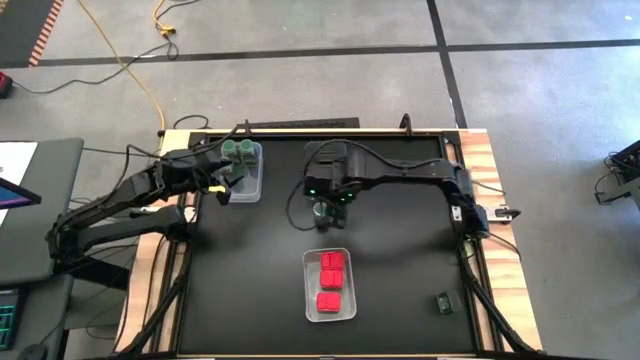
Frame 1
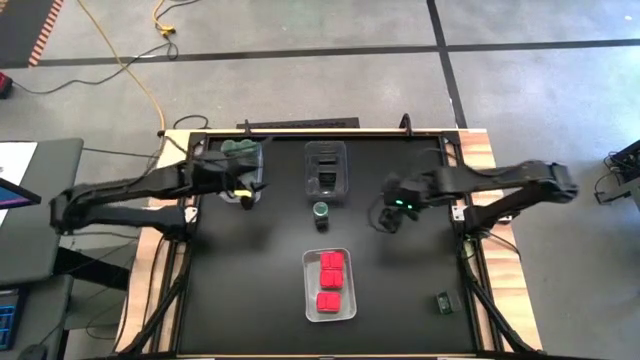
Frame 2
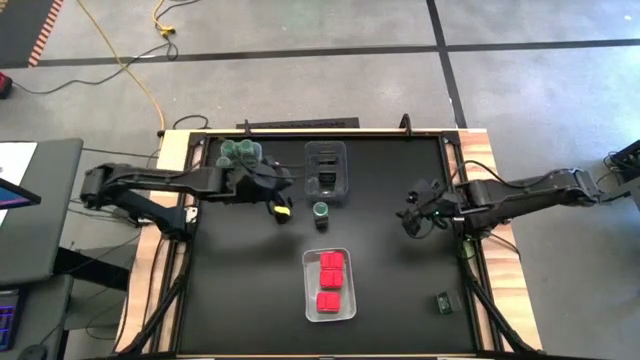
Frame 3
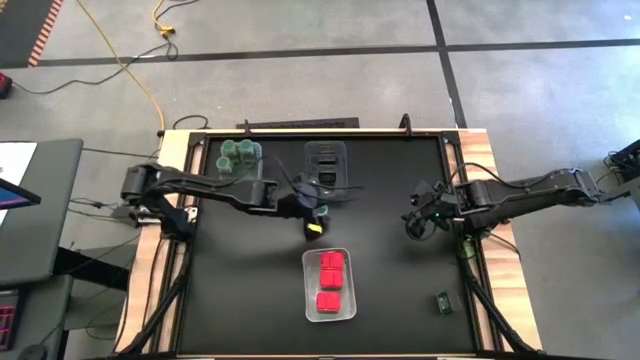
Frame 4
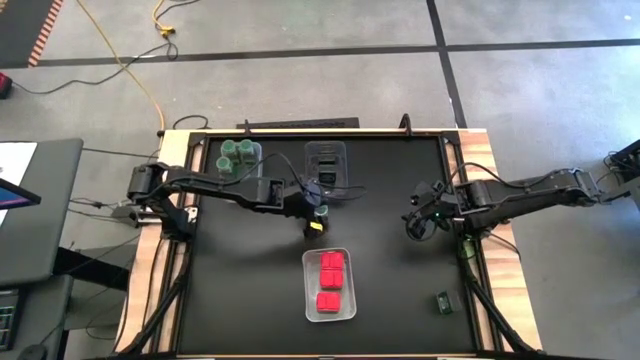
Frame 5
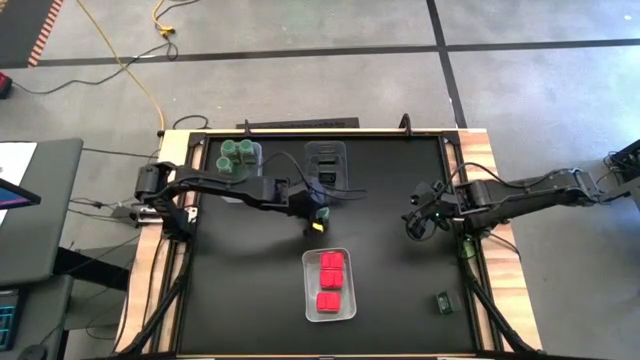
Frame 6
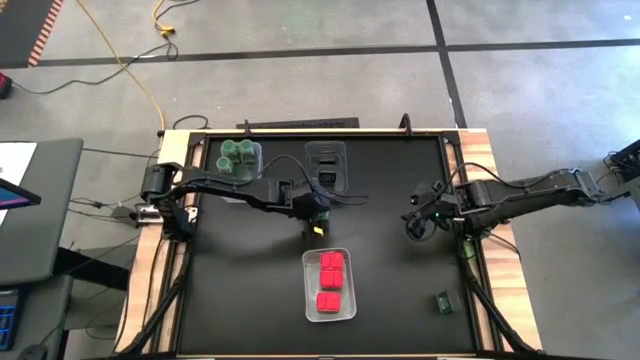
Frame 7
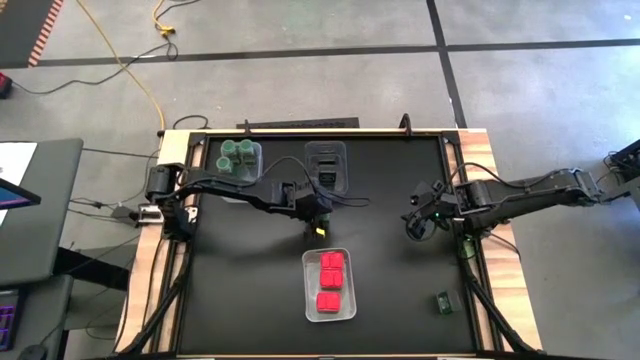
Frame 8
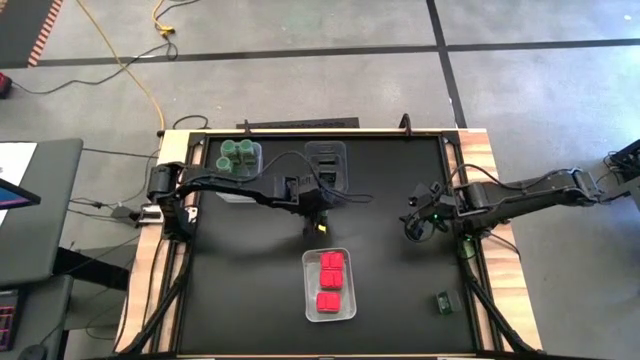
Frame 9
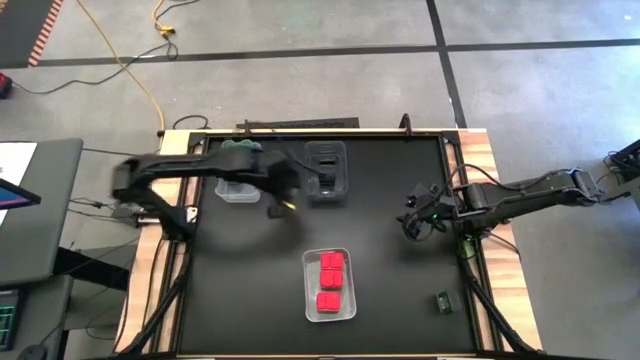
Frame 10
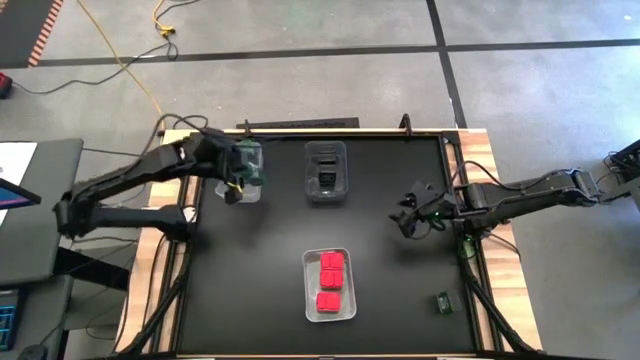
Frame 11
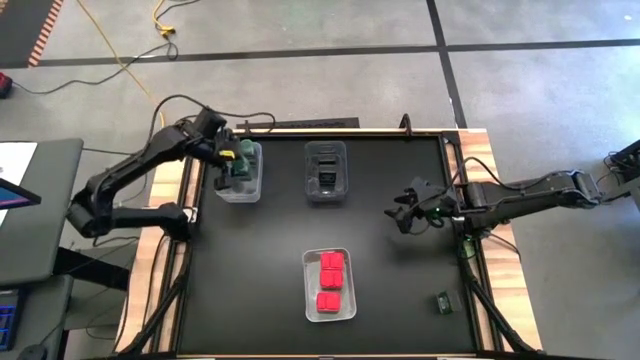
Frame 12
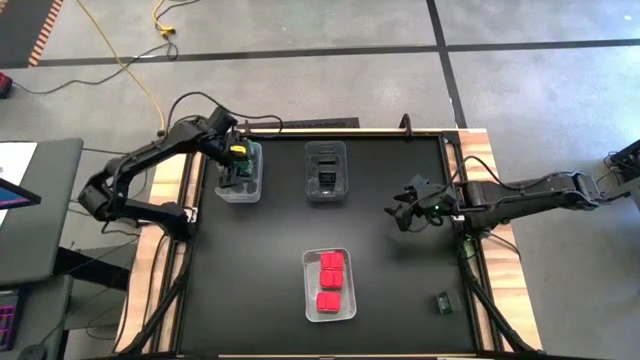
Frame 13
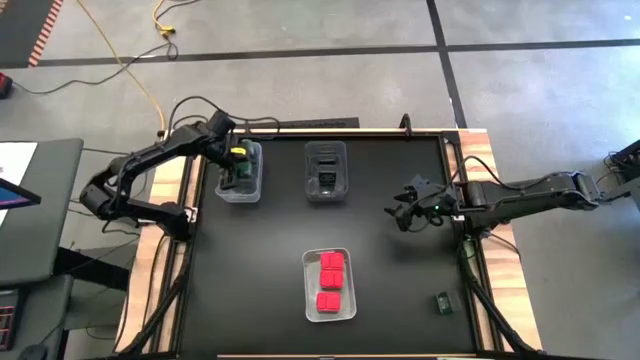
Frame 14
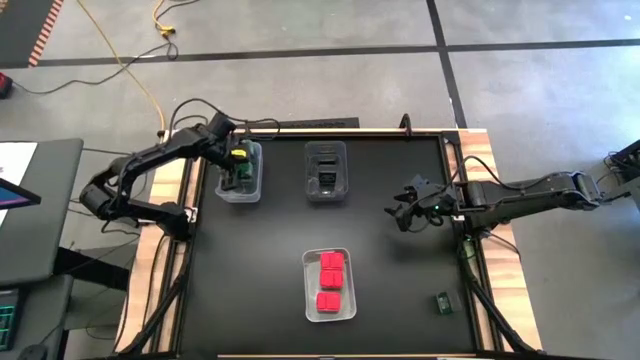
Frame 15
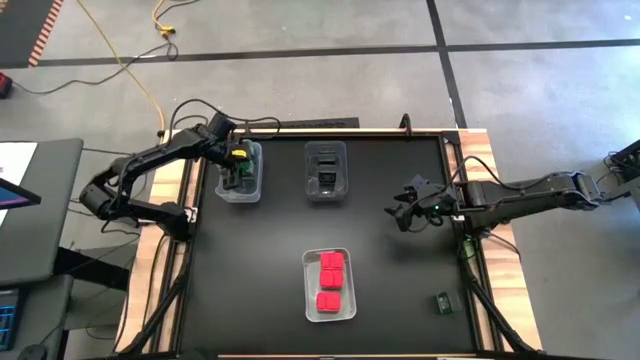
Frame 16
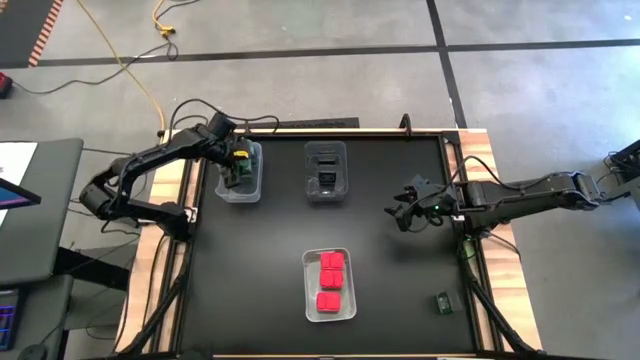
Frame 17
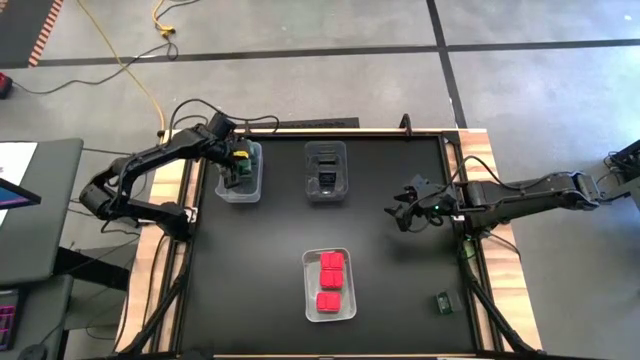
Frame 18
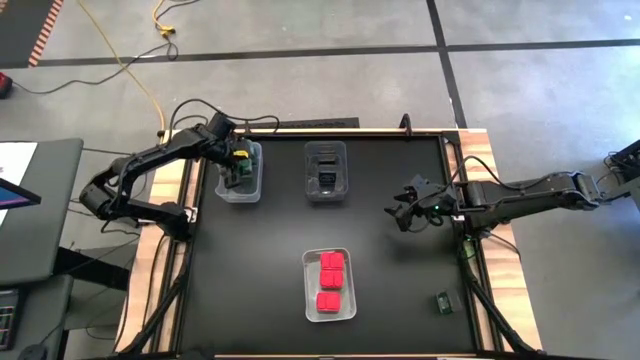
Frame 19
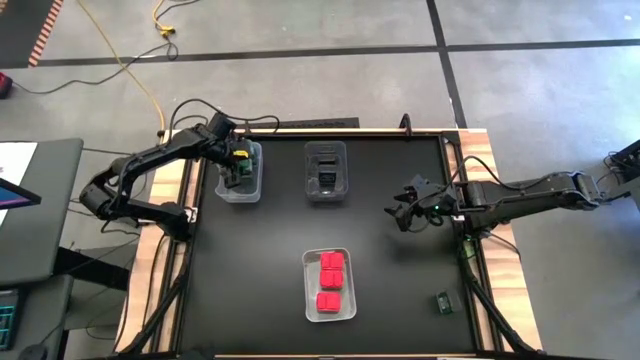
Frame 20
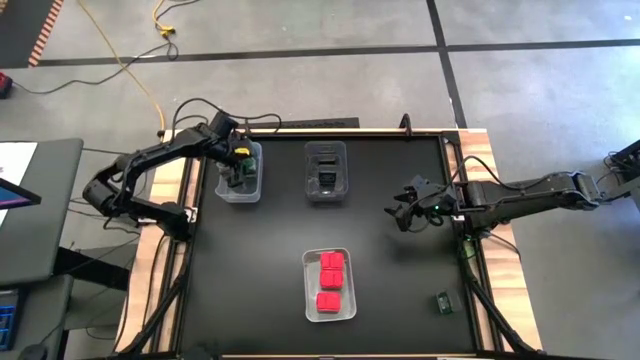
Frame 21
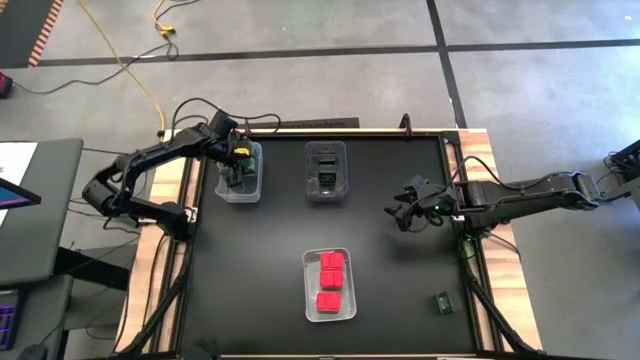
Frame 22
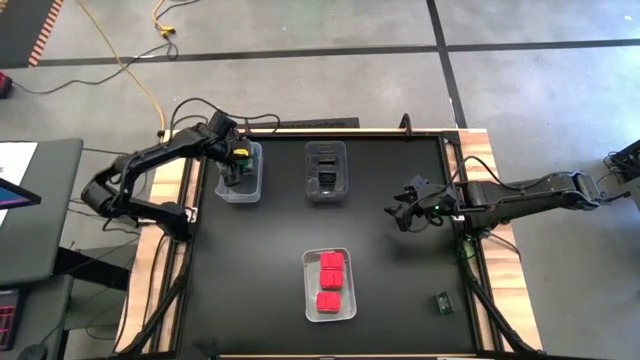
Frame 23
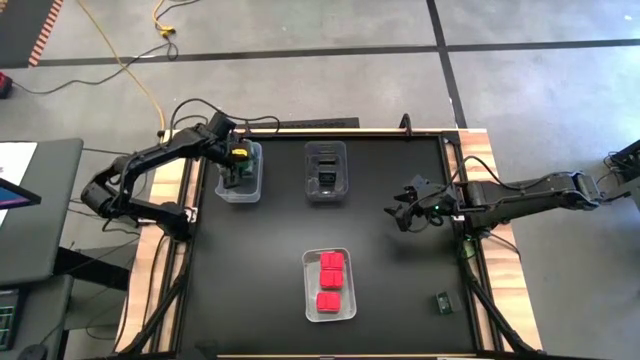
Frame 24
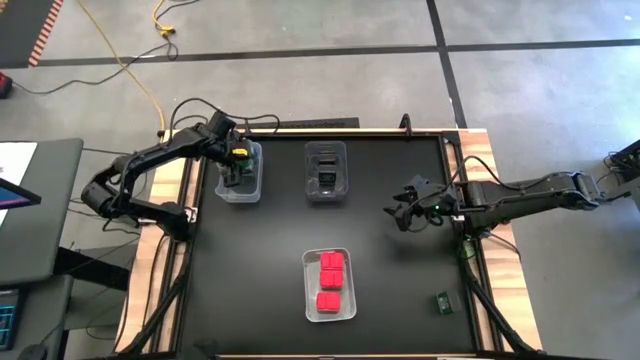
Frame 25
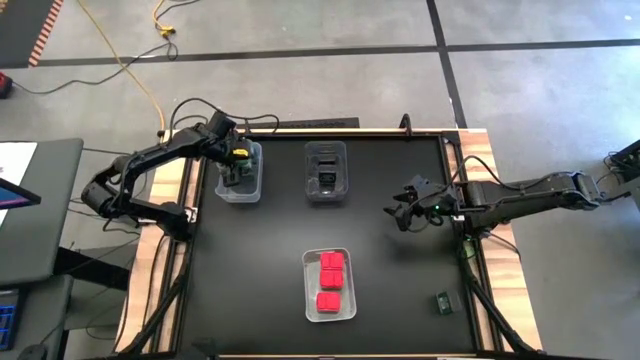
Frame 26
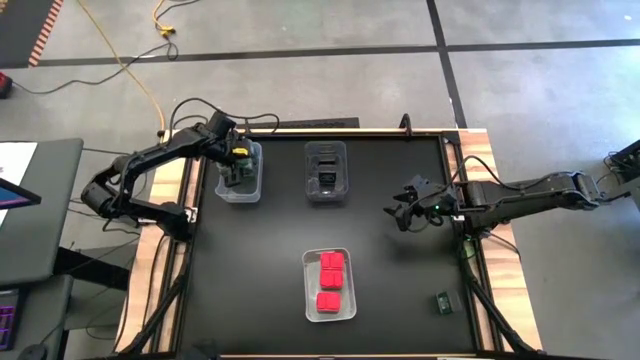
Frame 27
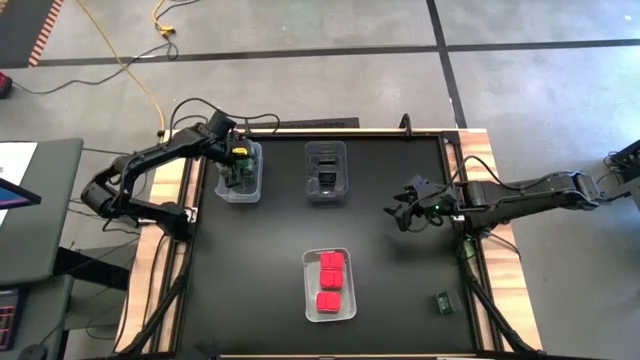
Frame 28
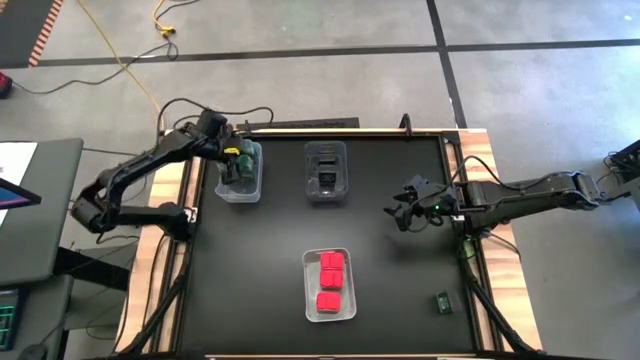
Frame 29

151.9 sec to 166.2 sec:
Task: Sort spices by type
Put the green seasoning bottle into the transparent bin

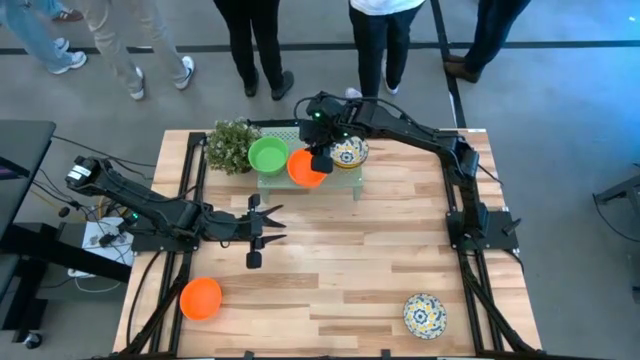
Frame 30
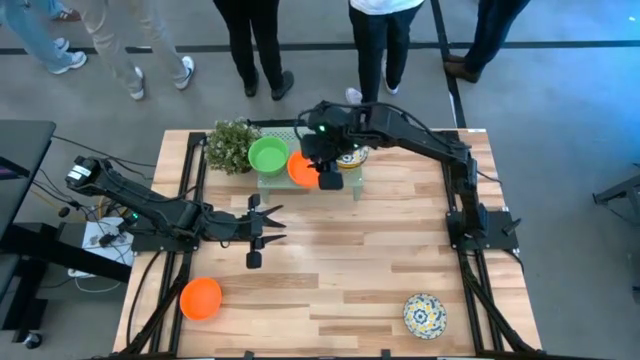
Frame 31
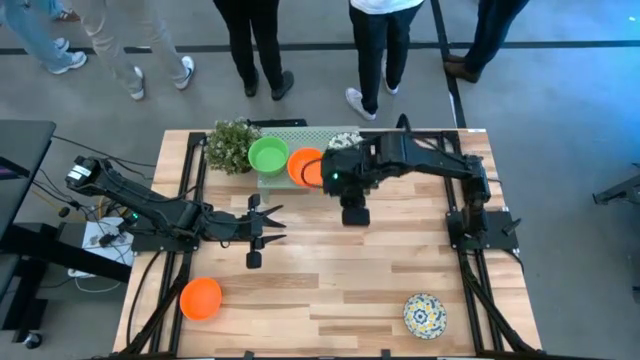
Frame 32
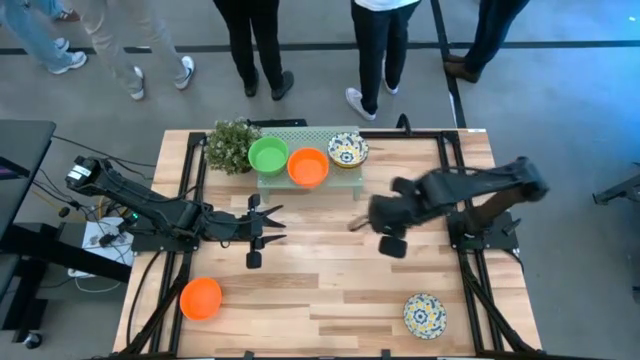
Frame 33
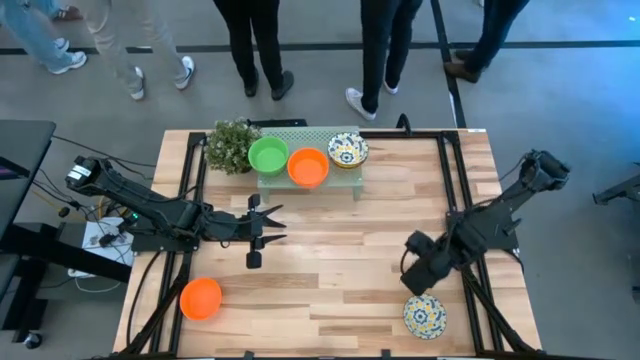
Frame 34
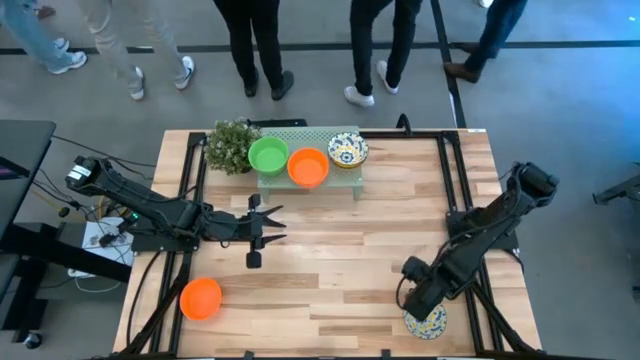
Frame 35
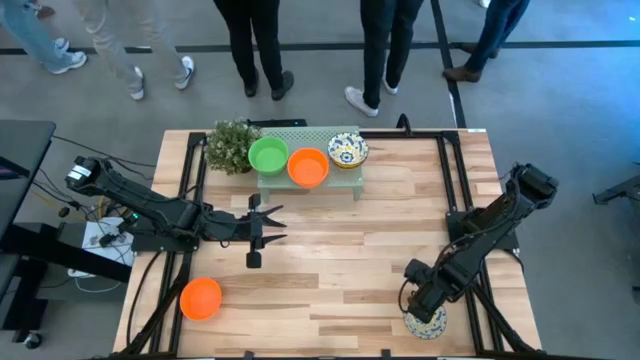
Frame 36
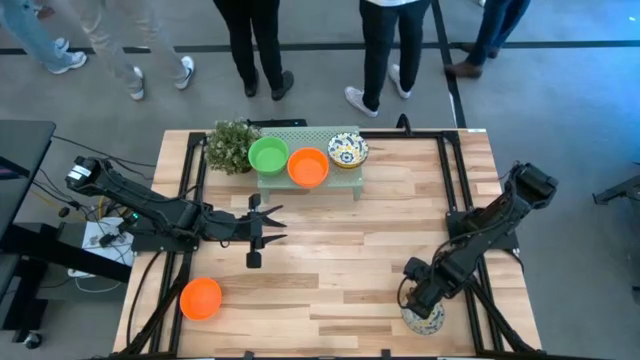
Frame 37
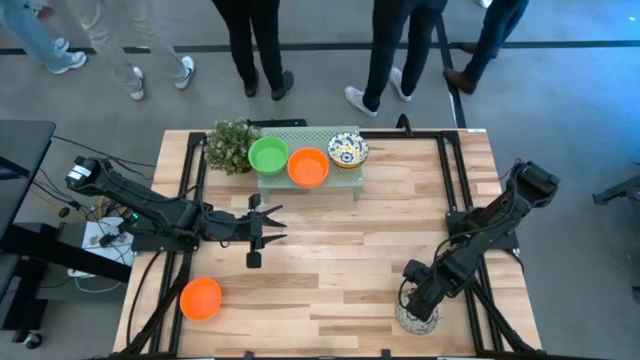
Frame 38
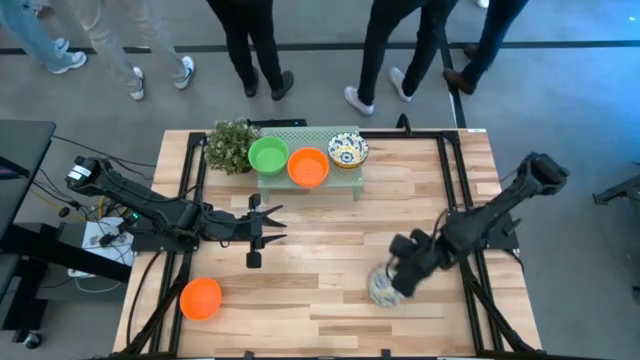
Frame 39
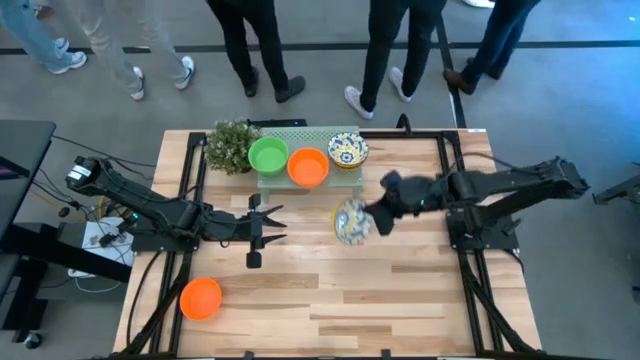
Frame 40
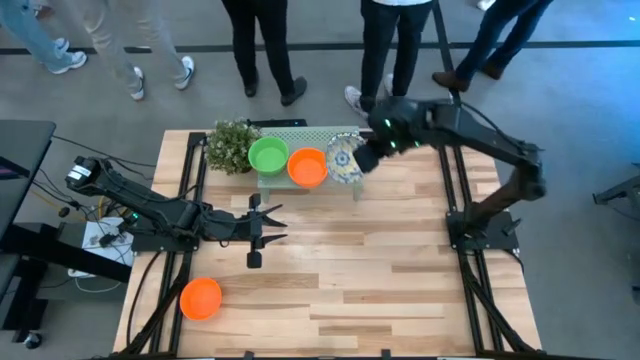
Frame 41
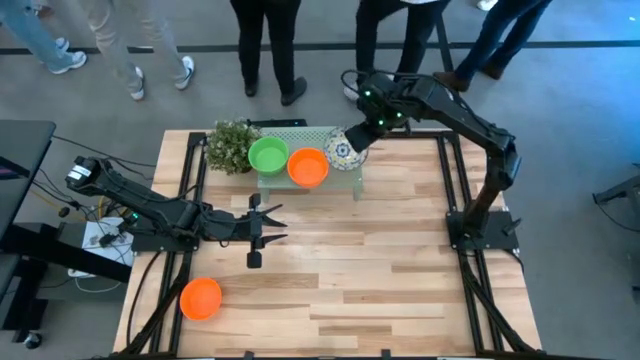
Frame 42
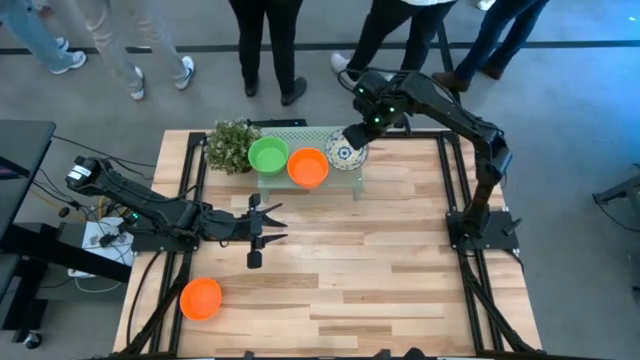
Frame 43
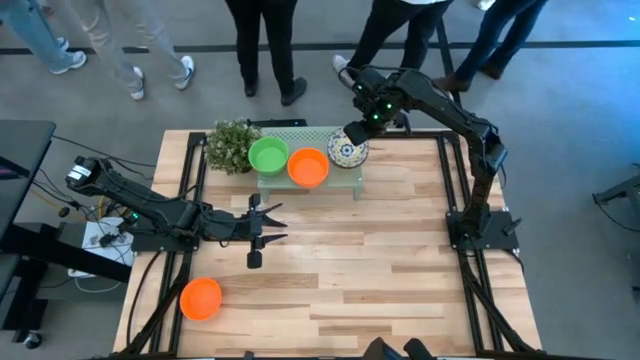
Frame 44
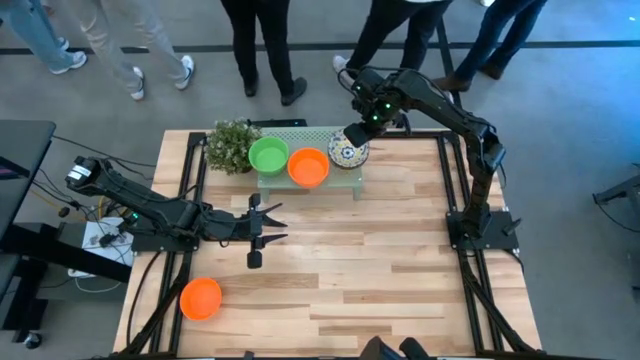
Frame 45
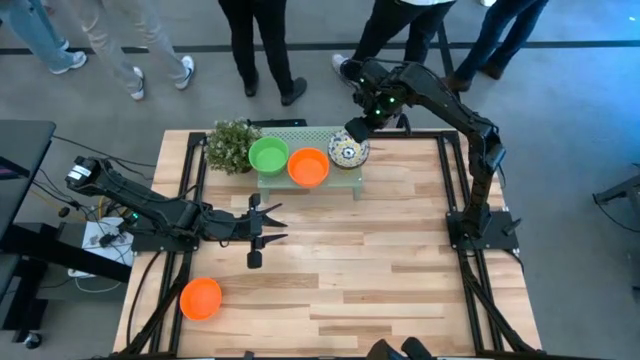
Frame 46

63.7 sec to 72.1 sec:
Task: Pick & Place Mini bowls
Stack the yellow bowl on top of the yellow bowl on the shelf
